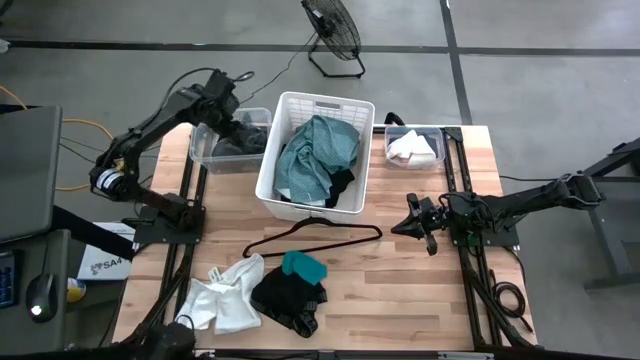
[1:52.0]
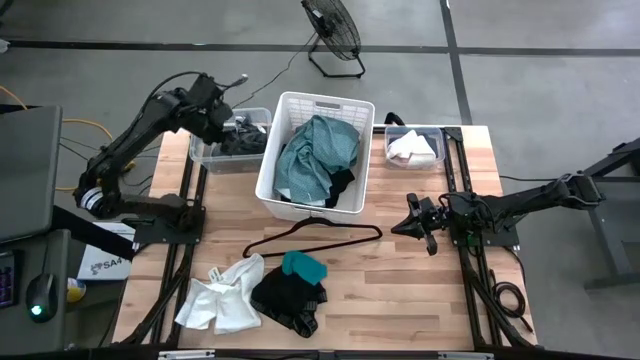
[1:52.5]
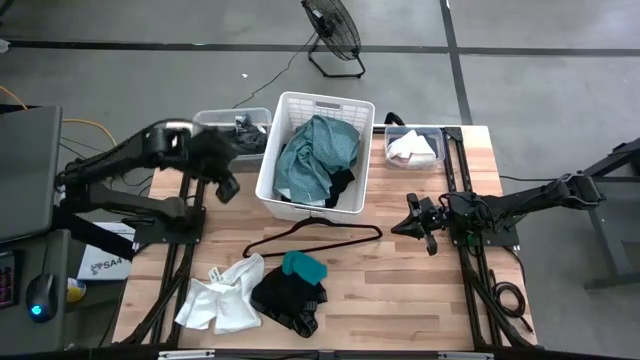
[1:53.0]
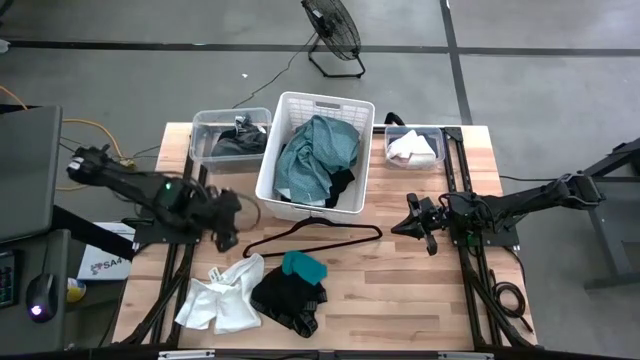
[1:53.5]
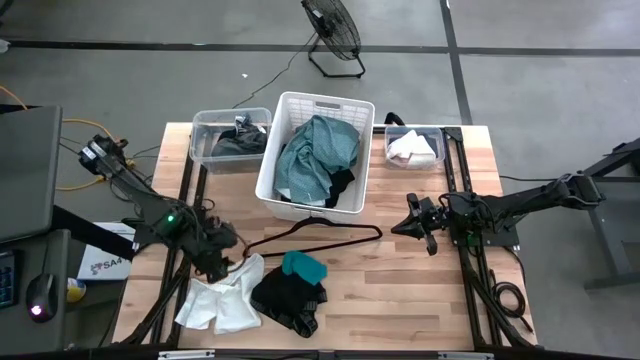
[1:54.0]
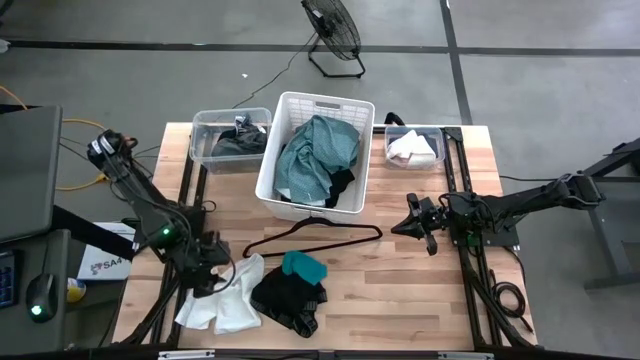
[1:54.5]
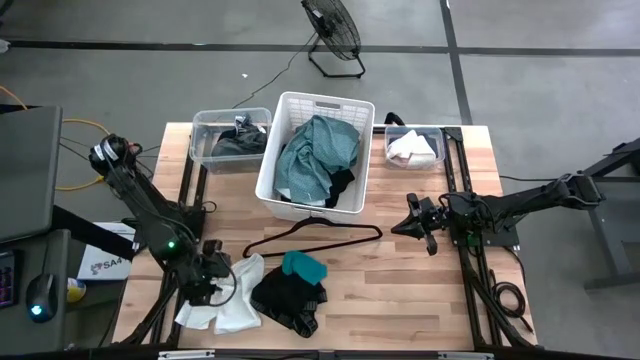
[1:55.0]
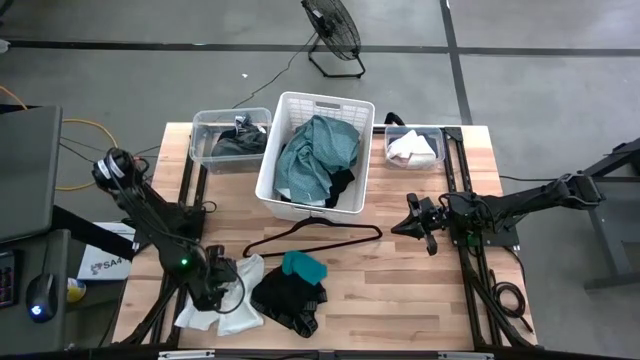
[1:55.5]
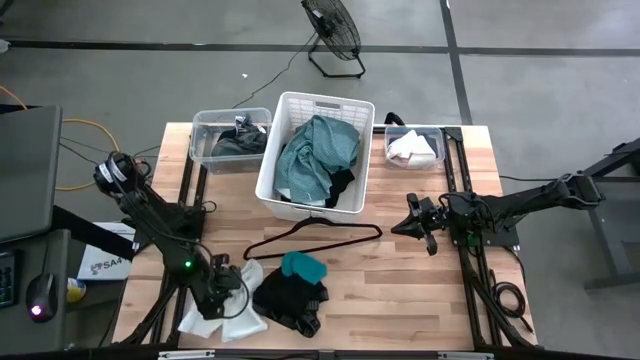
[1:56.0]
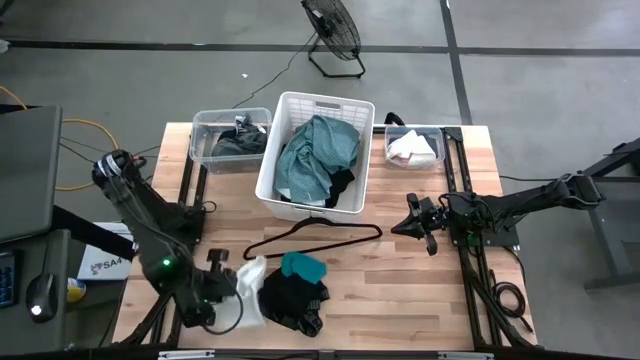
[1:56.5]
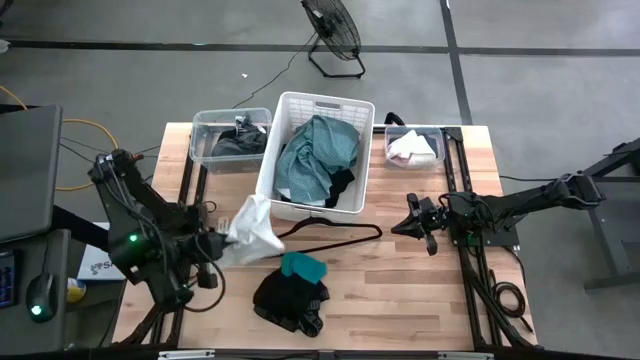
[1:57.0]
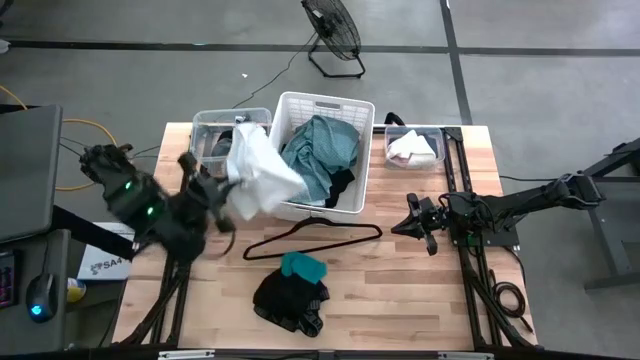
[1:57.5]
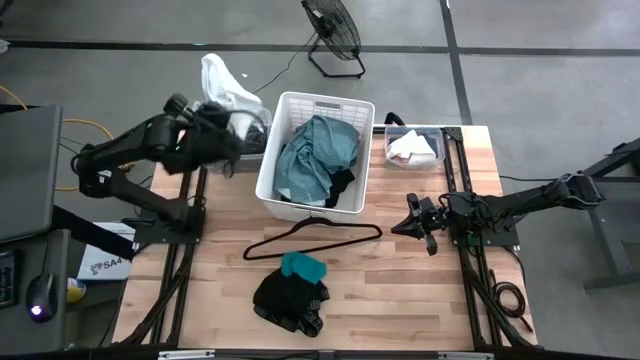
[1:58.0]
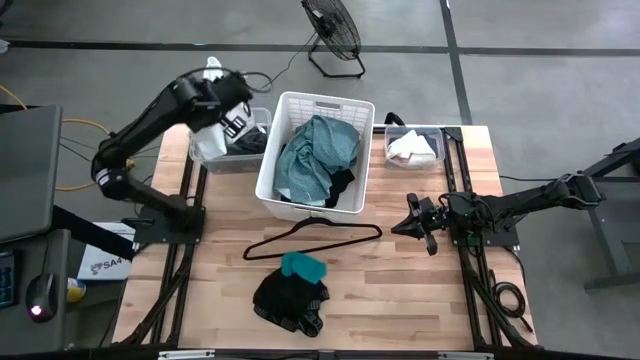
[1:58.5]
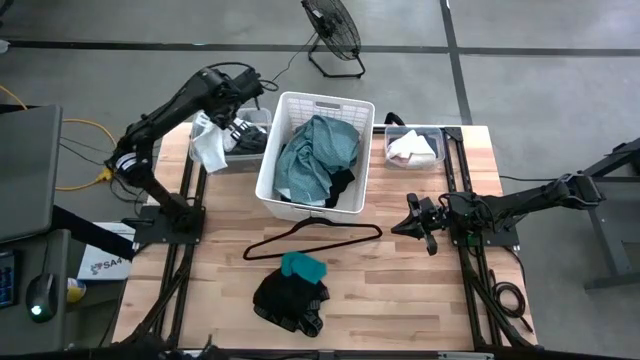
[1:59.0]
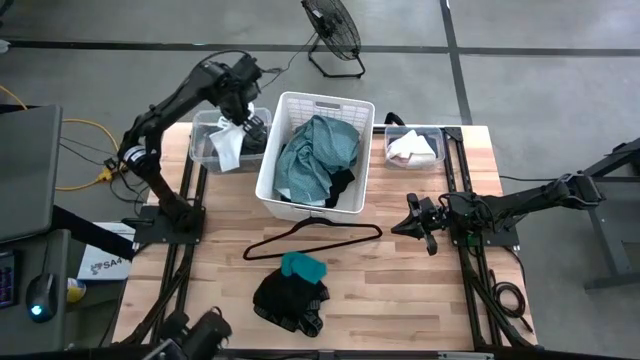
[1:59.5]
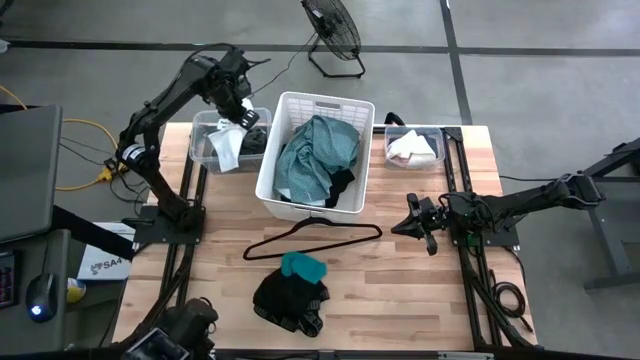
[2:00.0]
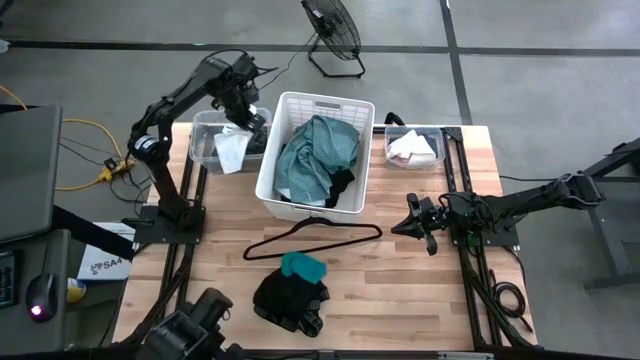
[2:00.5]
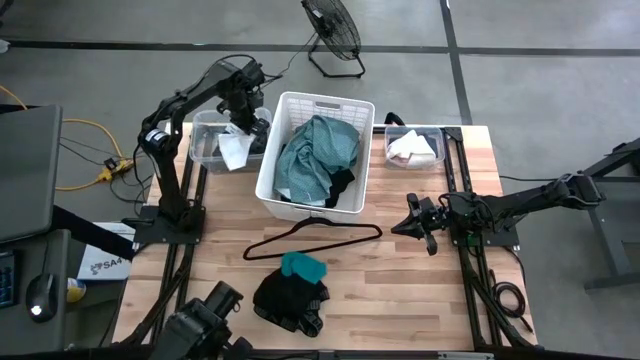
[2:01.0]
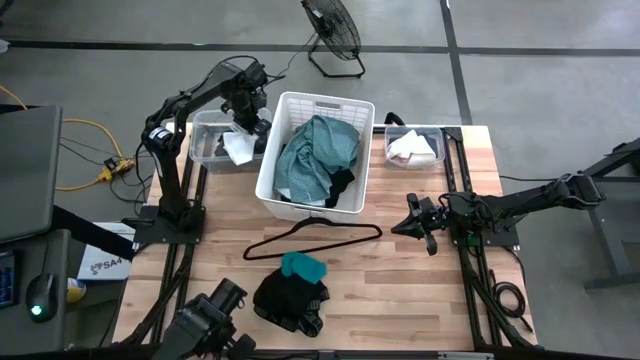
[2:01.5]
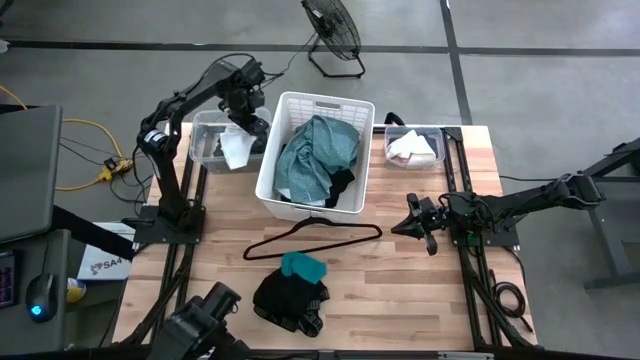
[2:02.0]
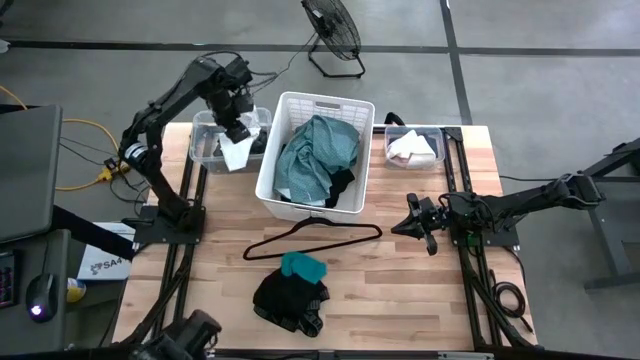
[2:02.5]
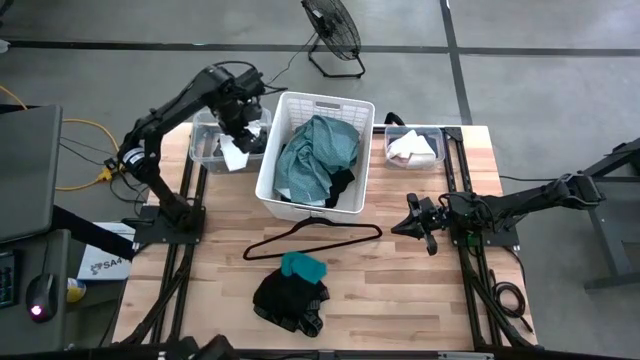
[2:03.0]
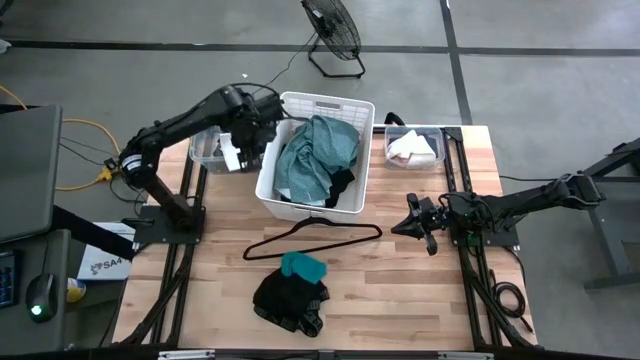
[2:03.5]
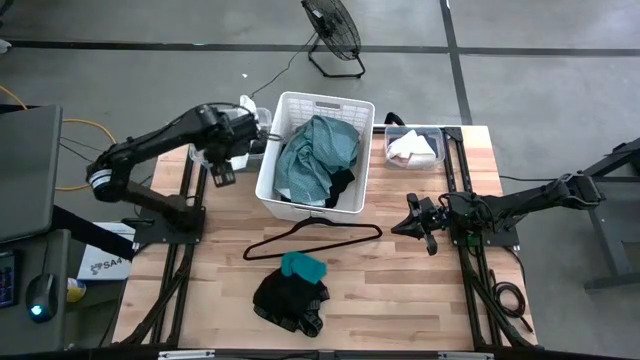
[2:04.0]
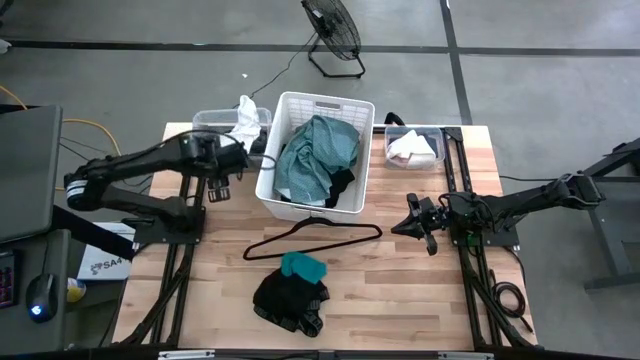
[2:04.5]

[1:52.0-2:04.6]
Task: Pick & Place Cloths
Put the white boxer short into the left transparent bin

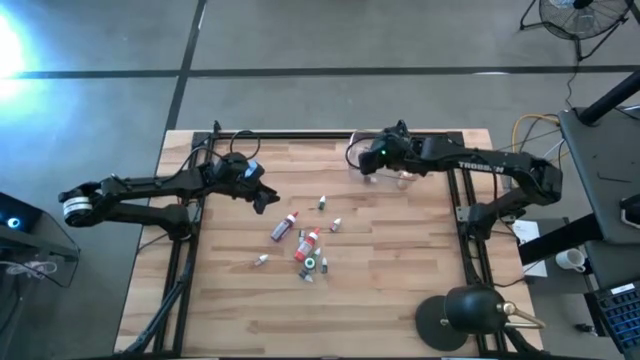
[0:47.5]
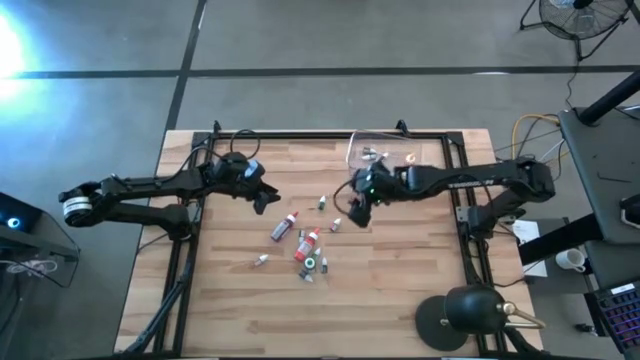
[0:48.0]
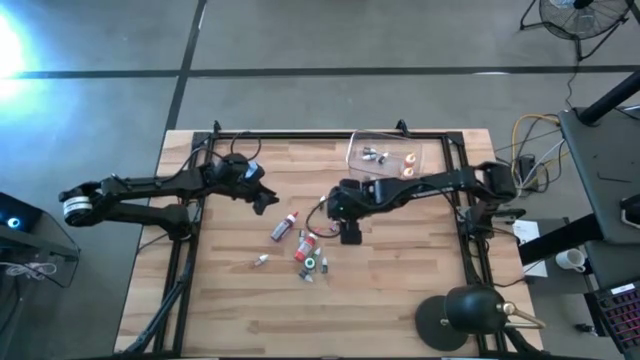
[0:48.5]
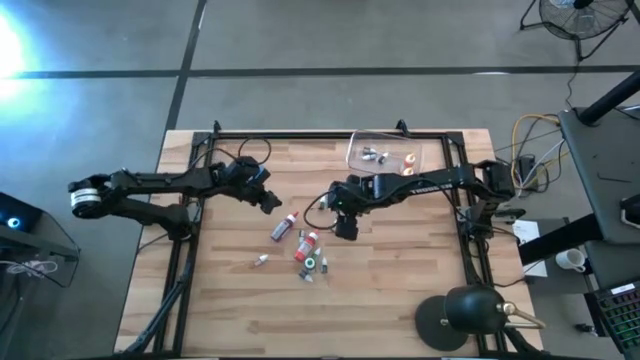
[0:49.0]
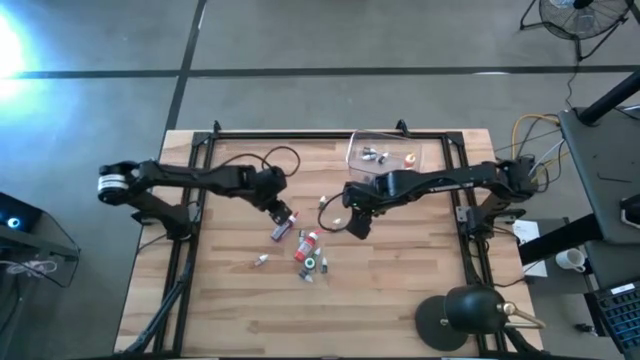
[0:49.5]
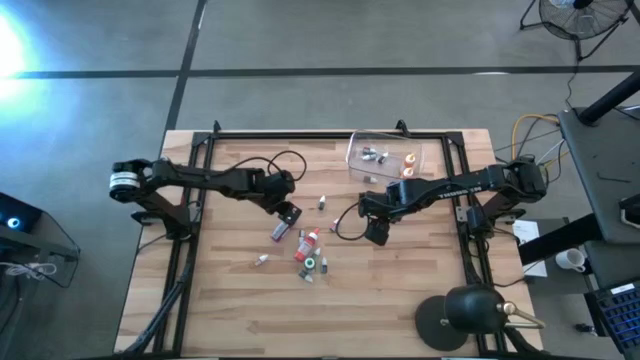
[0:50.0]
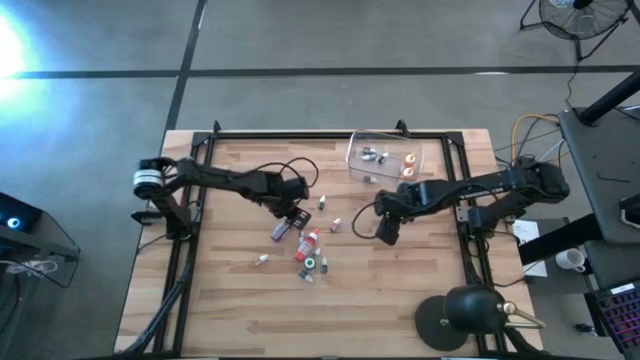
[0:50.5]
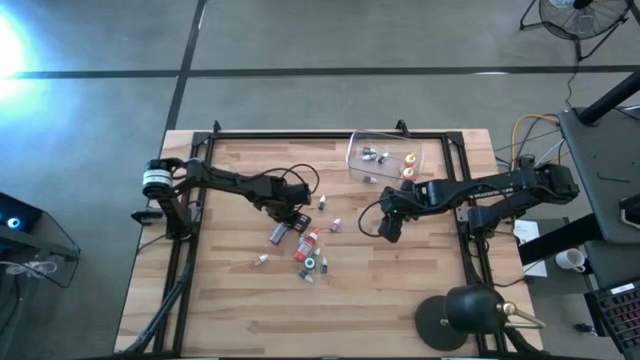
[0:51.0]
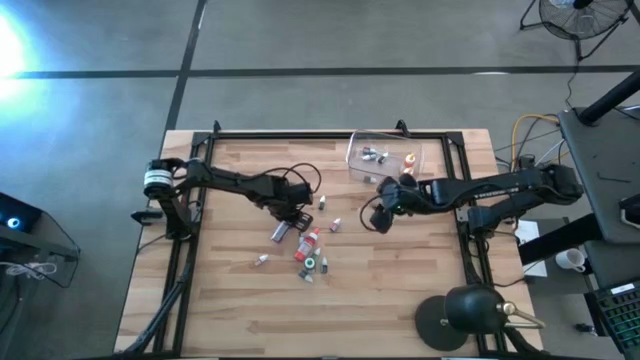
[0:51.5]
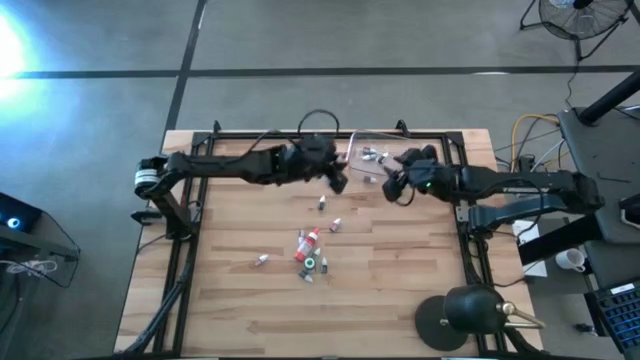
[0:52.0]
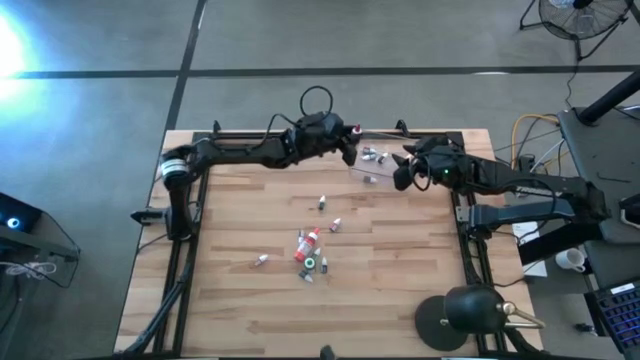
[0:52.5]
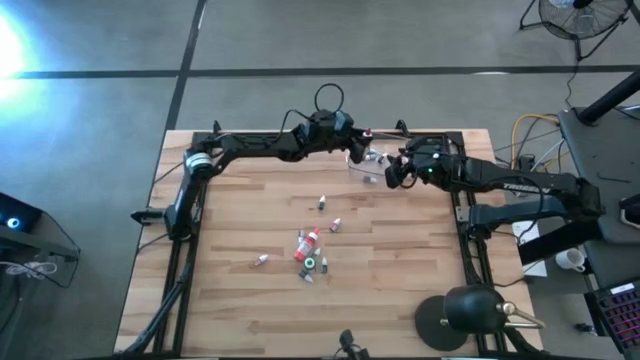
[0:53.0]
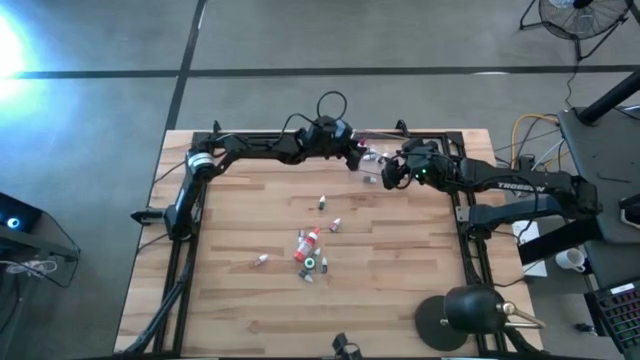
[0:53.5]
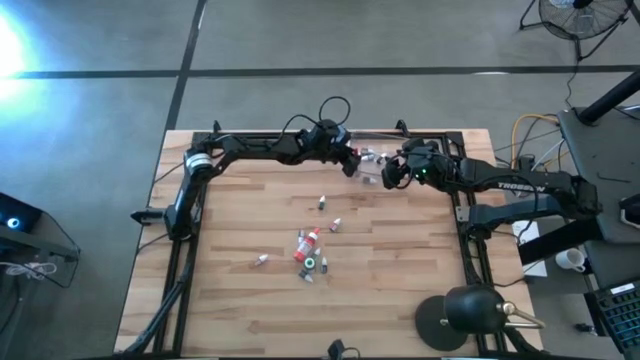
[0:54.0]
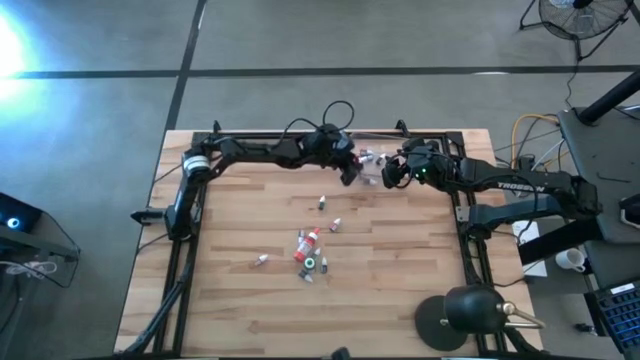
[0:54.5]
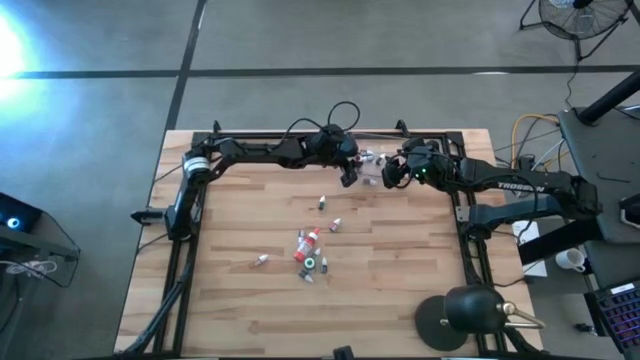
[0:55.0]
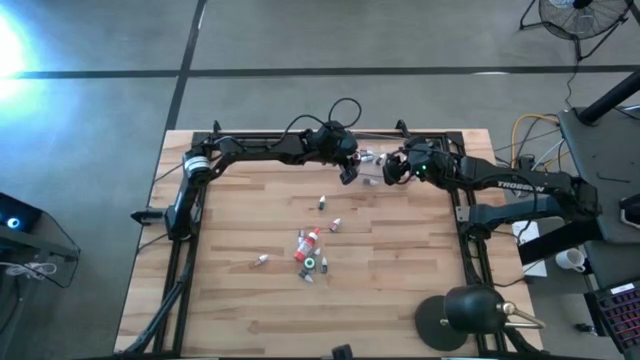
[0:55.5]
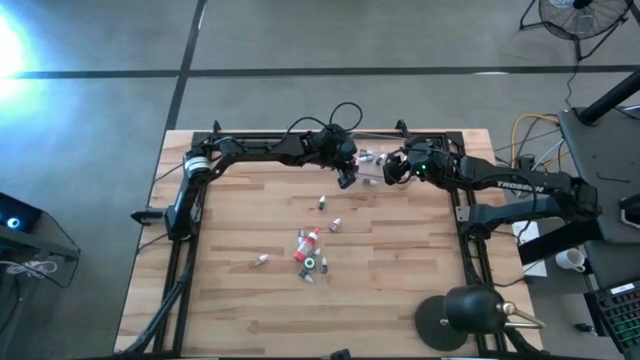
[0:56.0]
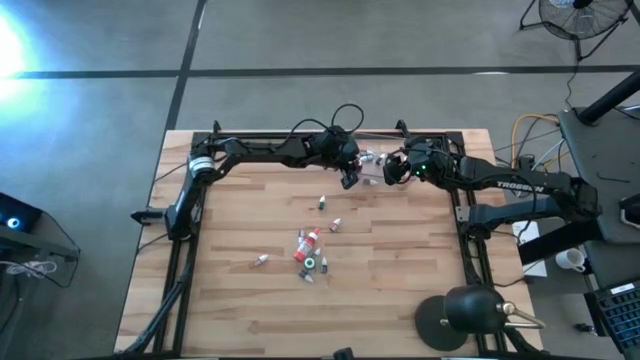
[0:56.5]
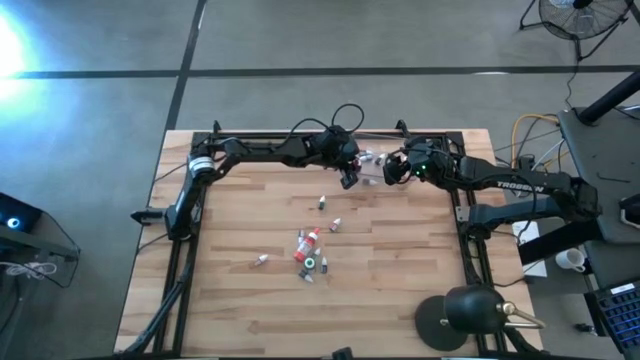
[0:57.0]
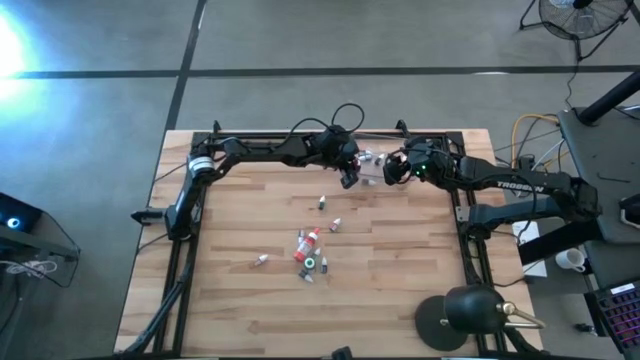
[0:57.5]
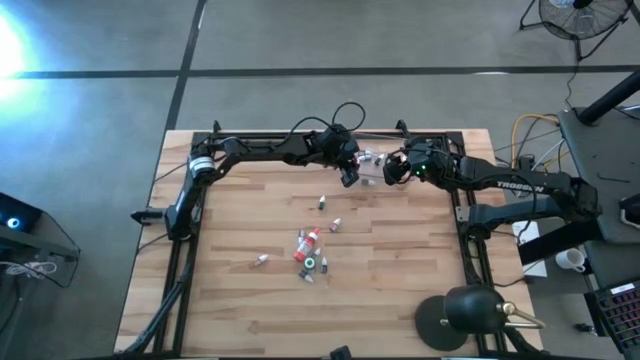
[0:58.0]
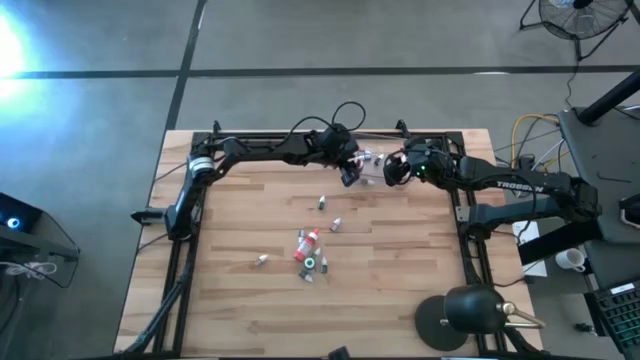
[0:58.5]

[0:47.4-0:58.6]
Task: Pick & Place food coloring
Put the large red food coloring bottle into the transparent bin
